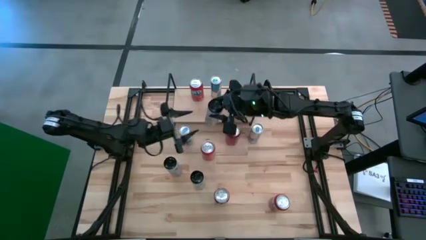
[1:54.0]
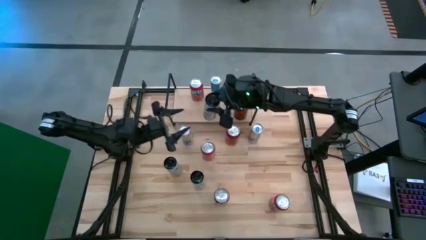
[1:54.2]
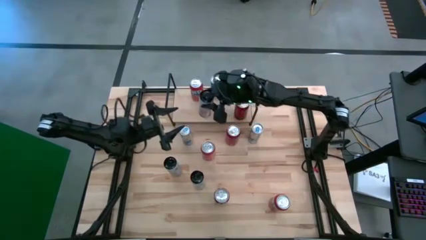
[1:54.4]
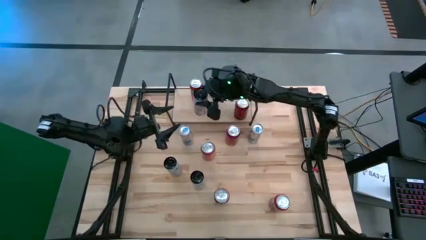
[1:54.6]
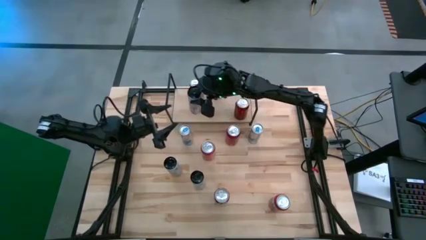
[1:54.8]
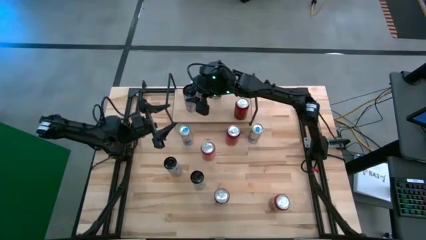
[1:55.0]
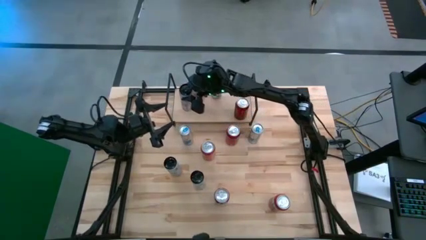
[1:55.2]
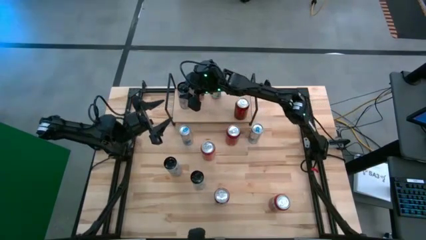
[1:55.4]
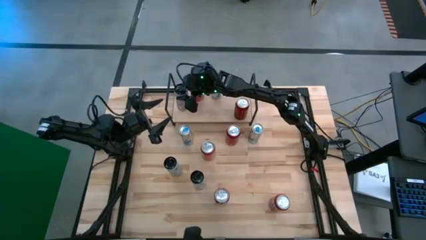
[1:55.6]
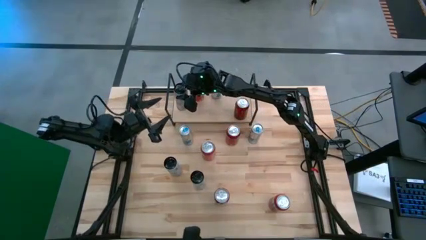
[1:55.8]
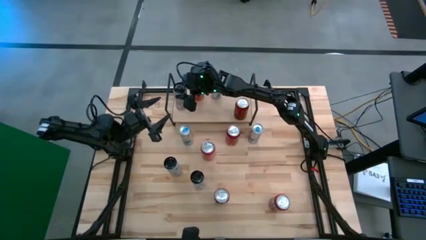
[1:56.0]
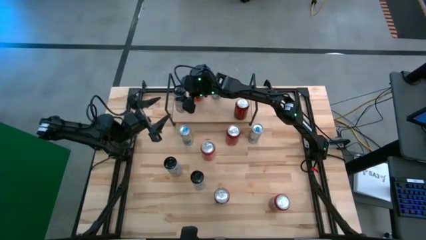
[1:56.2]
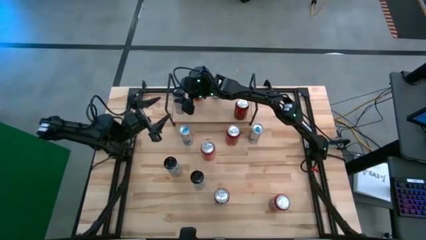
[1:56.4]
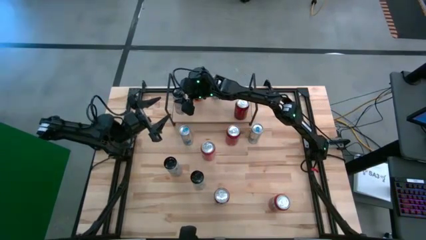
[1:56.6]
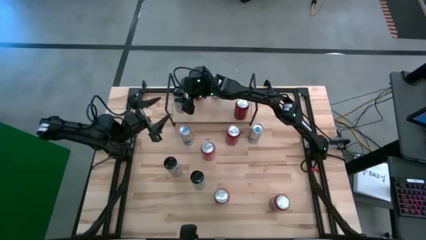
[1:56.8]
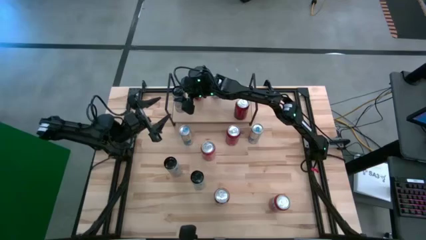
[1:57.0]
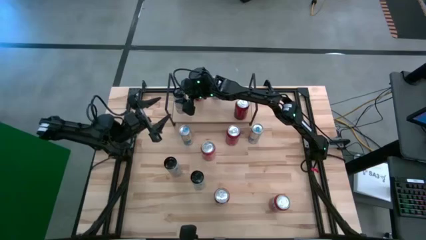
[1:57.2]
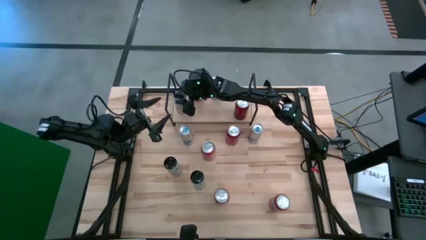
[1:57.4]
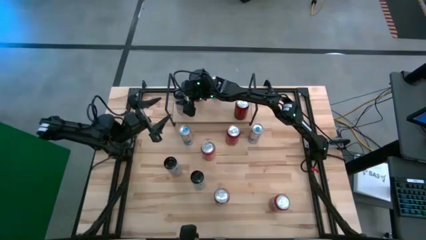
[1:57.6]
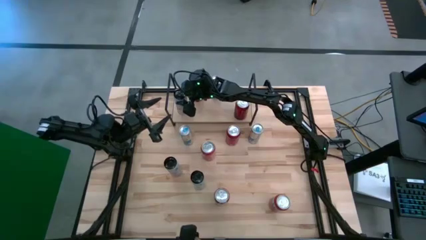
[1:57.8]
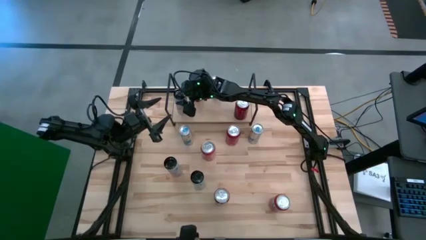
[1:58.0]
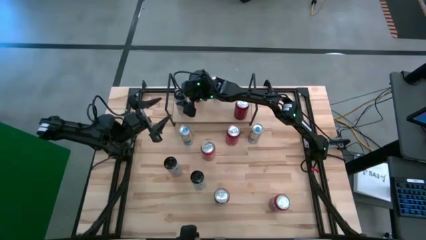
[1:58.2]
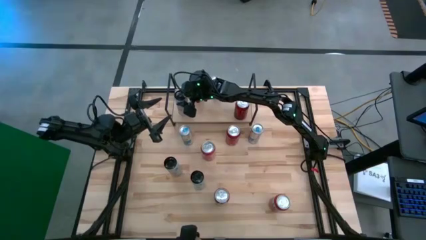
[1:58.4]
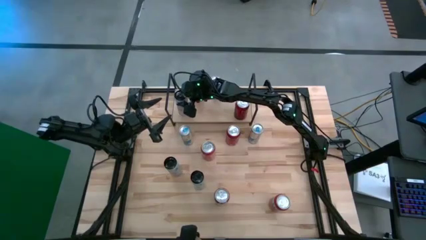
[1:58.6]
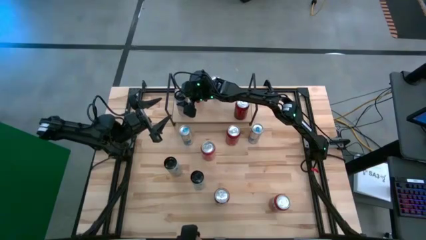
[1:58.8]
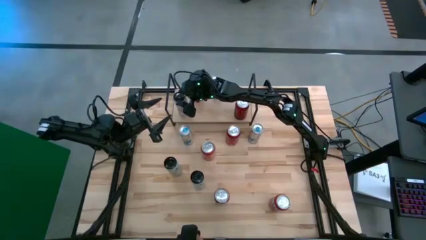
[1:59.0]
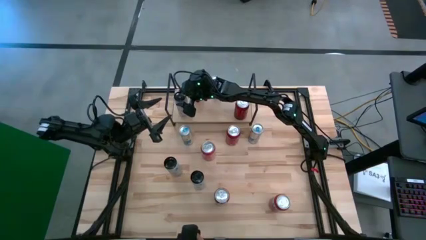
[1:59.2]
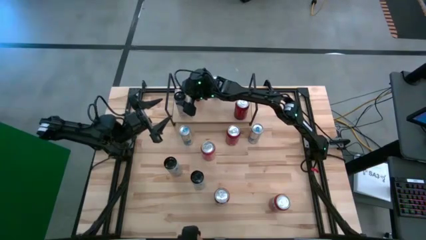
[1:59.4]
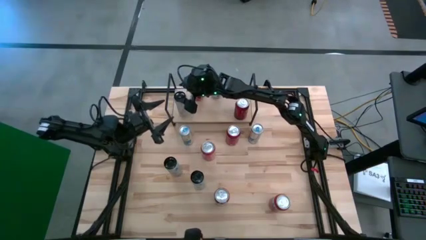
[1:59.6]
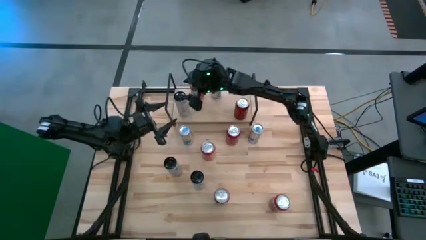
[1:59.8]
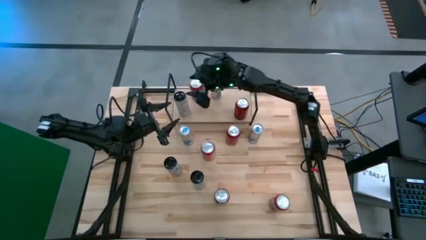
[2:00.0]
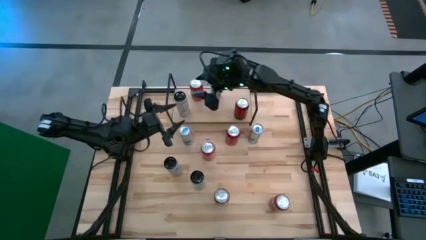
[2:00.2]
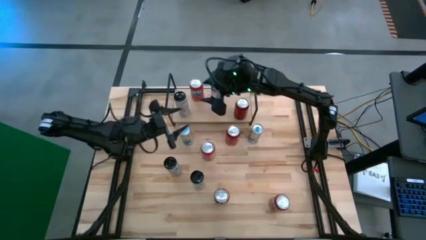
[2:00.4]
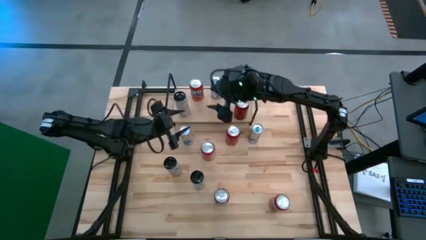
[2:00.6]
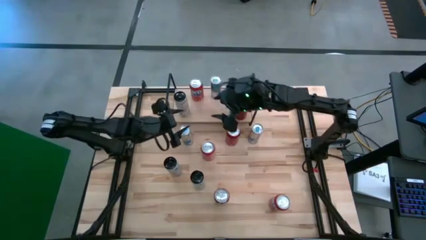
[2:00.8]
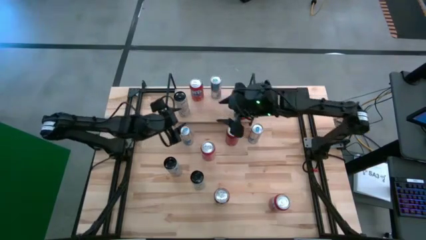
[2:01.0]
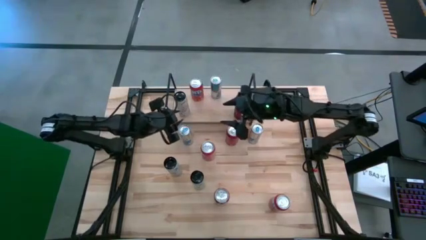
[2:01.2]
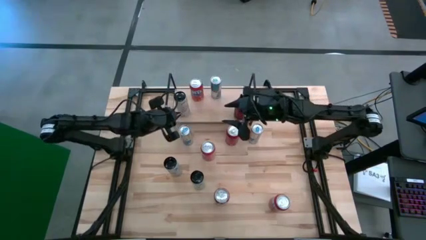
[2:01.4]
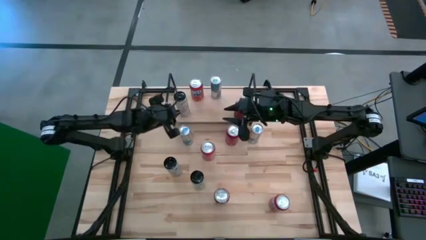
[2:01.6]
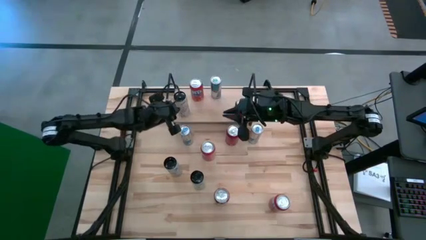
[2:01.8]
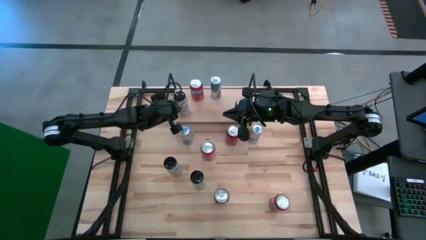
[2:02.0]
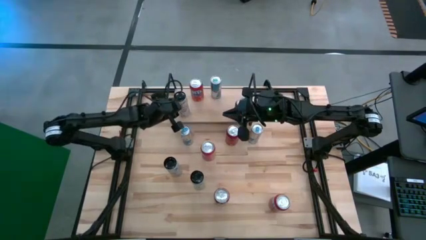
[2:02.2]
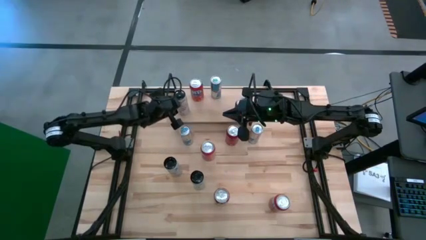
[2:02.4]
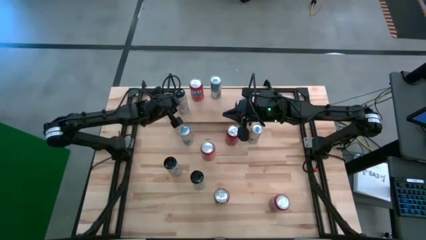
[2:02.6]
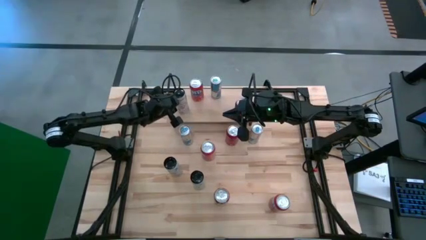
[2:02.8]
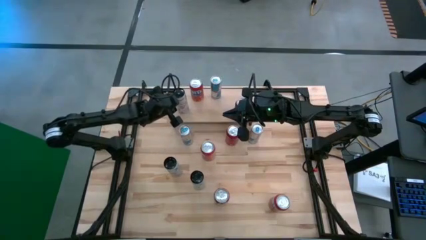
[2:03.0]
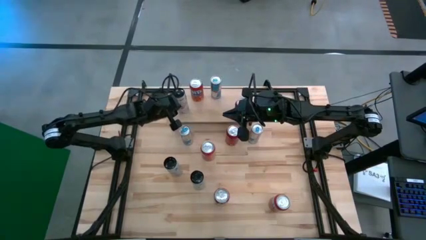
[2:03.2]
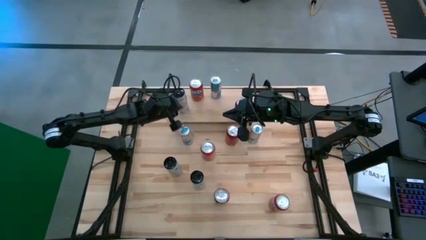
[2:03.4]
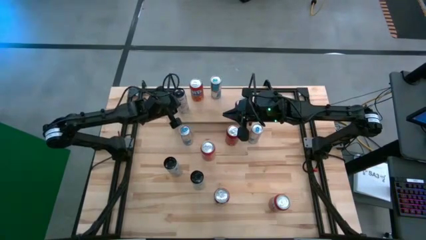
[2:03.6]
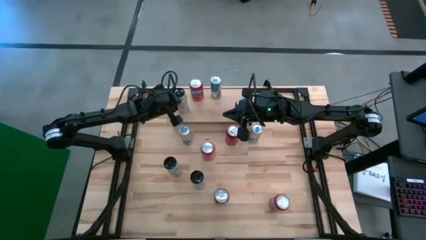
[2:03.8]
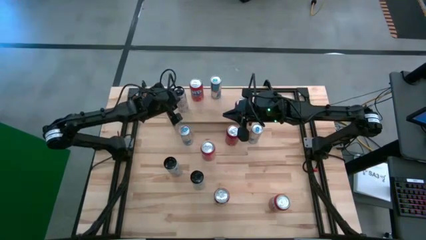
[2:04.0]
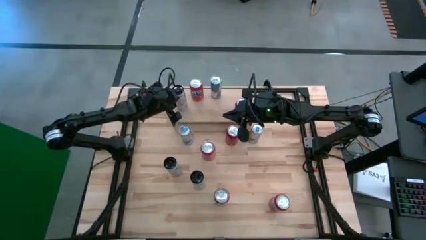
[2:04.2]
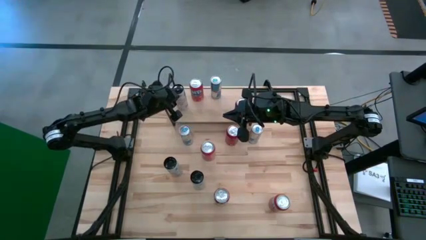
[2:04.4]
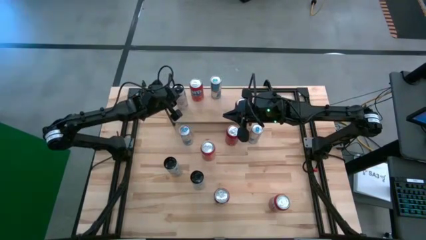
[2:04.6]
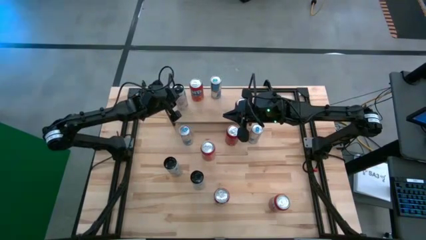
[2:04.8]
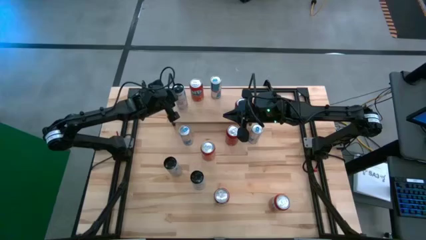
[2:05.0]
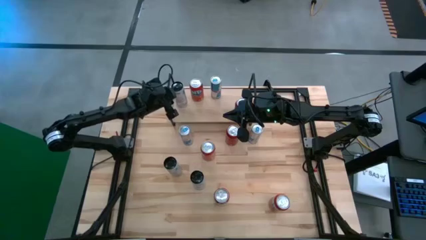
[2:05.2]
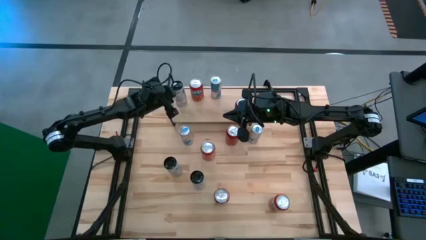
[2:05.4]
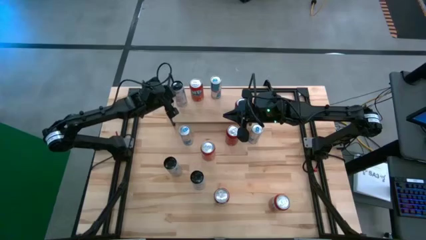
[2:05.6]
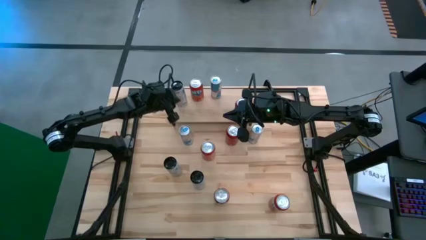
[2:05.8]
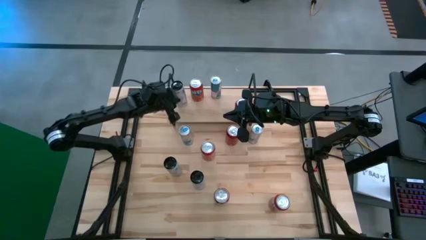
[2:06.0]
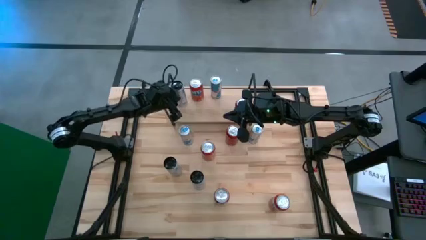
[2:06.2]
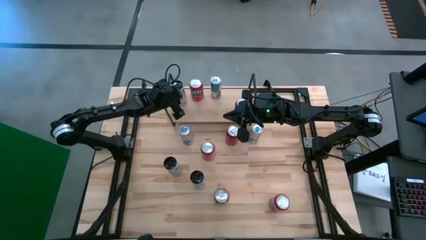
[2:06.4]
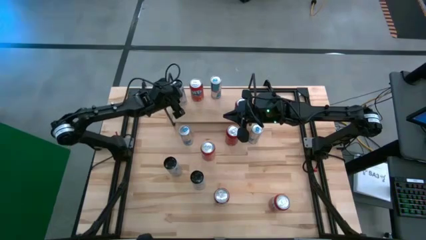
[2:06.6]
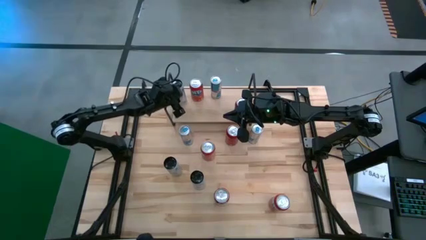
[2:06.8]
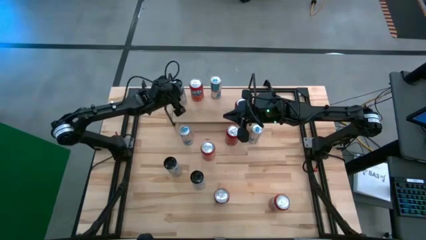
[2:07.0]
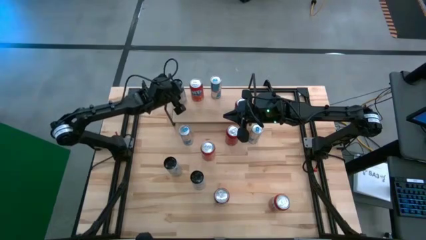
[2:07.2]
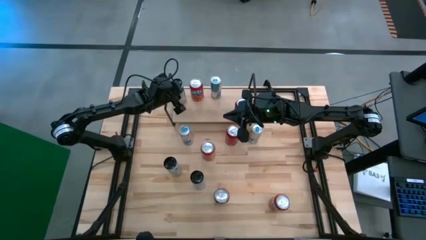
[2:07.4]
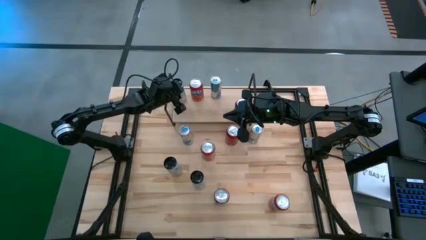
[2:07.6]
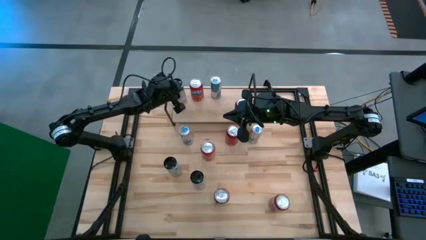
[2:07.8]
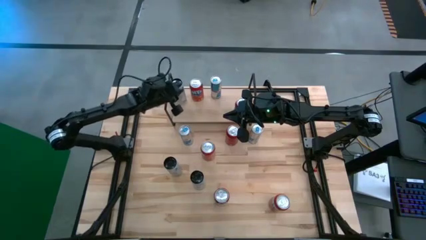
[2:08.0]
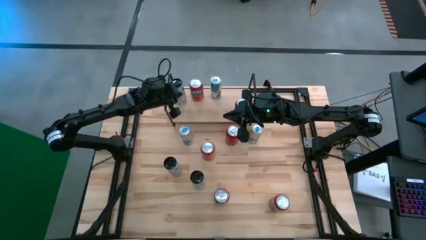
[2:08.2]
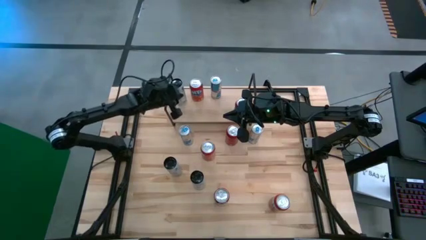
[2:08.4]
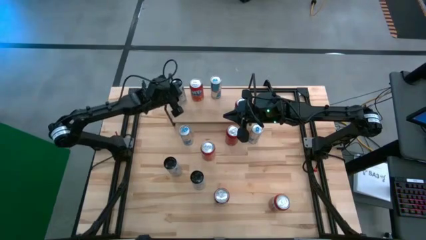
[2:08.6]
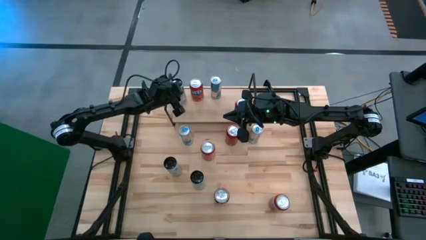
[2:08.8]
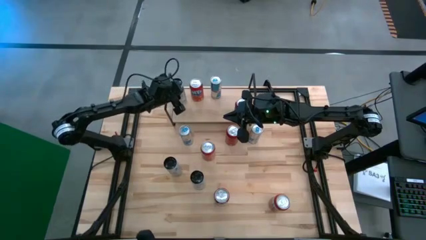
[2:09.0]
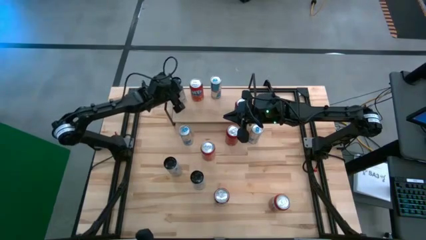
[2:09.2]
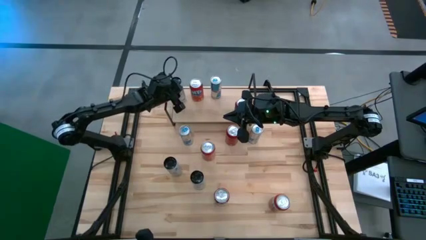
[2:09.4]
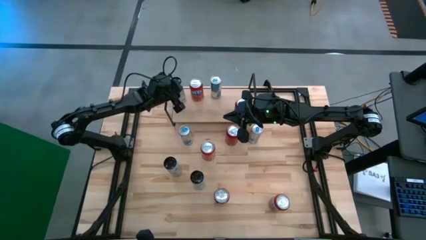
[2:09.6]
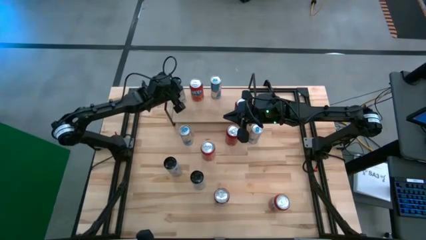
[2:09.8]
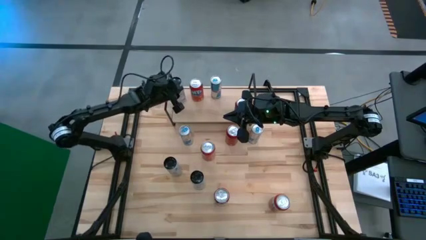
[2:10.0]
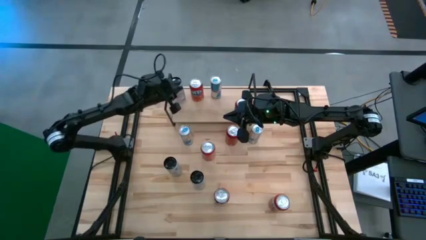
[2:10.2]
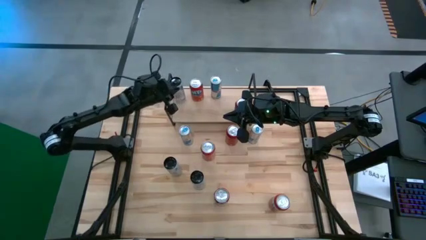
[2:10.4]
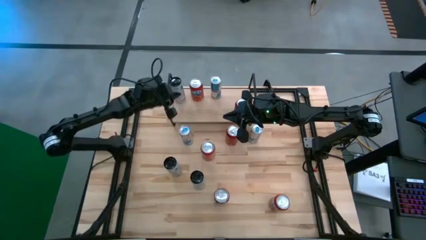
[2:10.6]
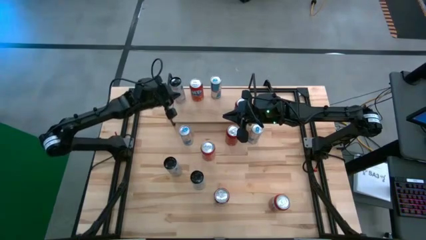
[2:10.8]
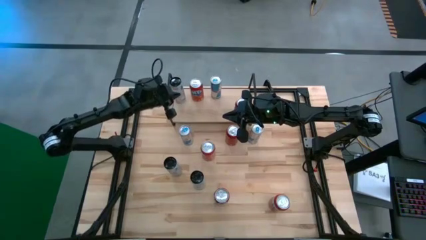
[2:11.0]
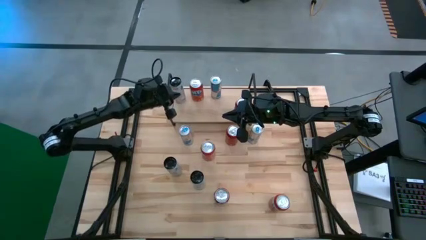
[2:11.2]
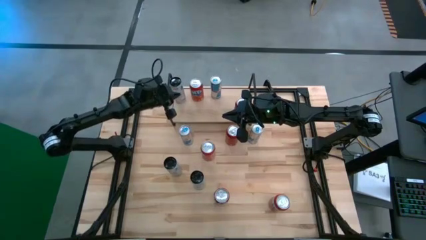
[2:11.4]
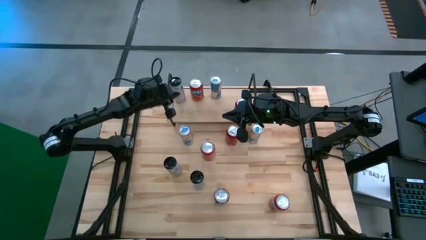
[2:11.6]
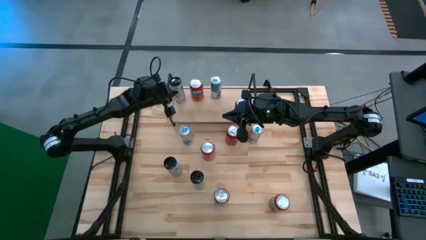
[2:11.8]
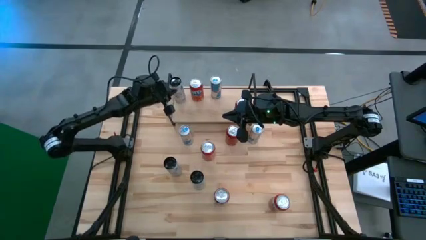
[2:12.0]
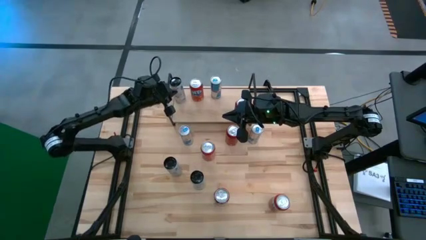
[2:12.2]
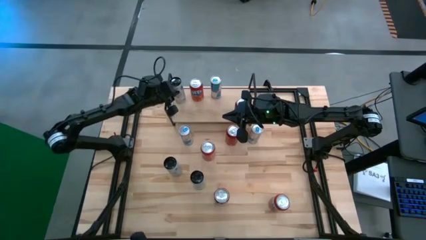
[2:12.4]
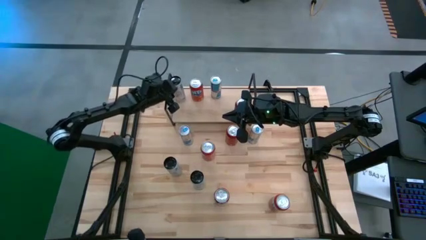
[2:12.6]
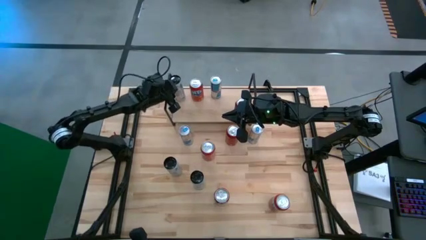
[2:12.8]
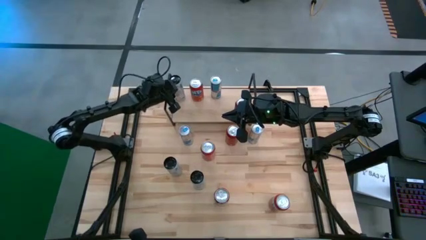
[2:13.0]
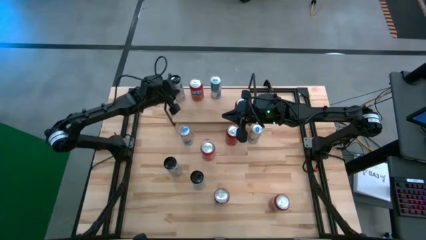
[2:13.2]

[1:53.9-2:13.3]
Task: Place canned beverage on shelf
Put the bottom right white soda can on the shelf
